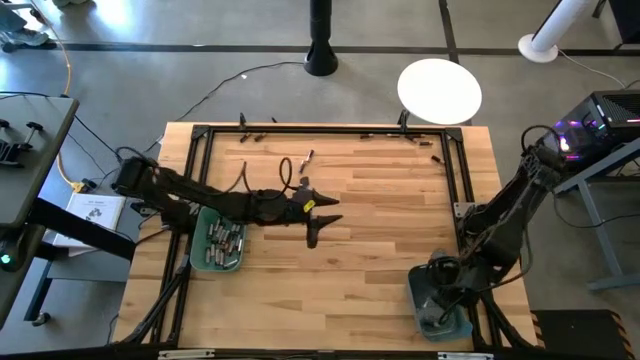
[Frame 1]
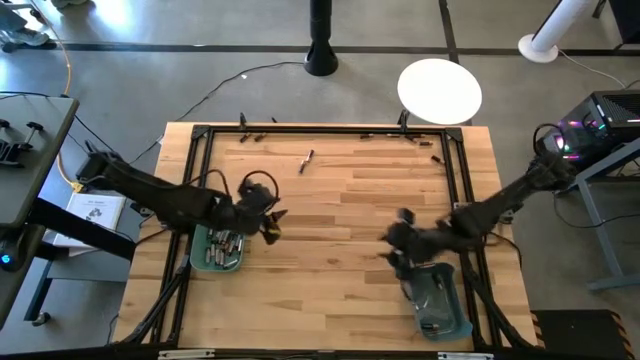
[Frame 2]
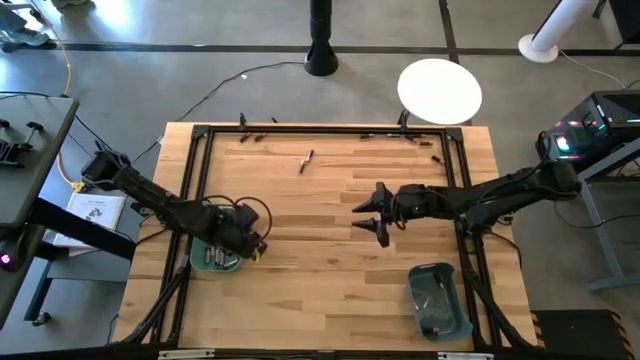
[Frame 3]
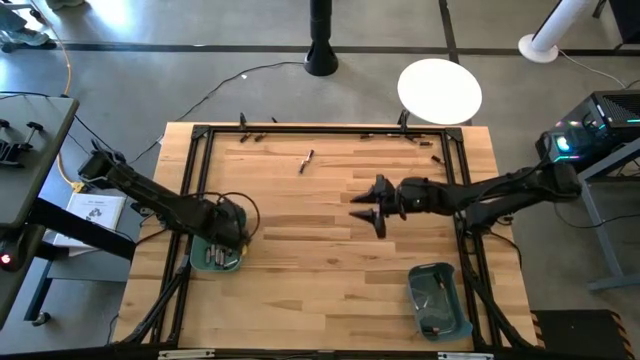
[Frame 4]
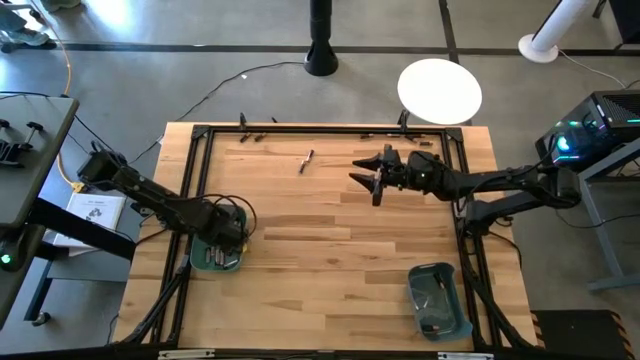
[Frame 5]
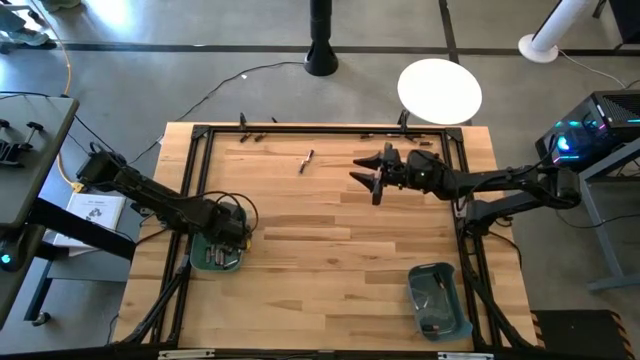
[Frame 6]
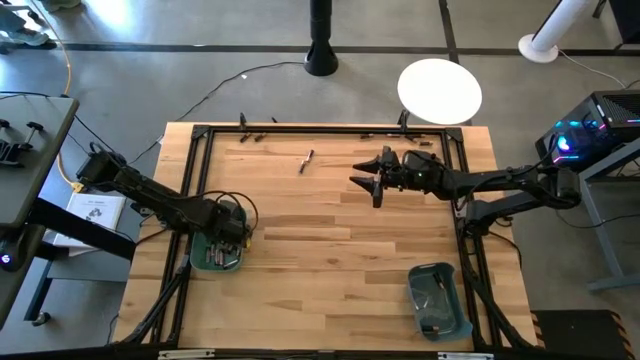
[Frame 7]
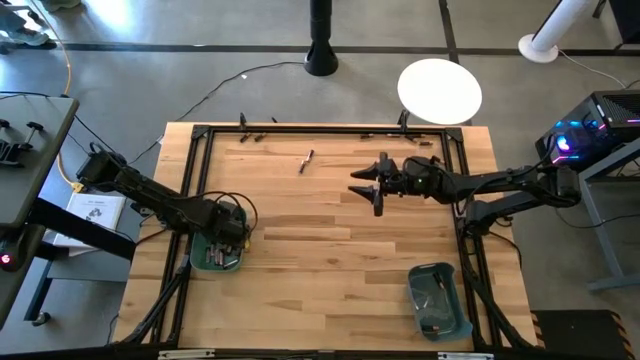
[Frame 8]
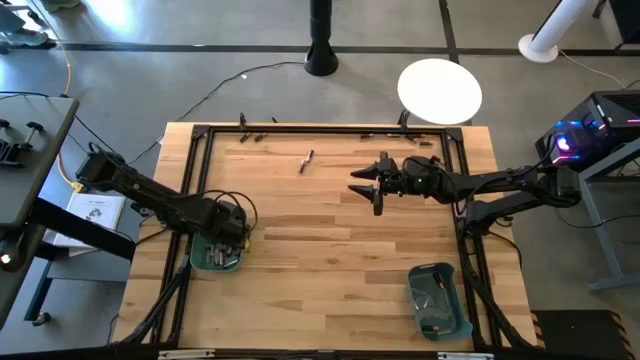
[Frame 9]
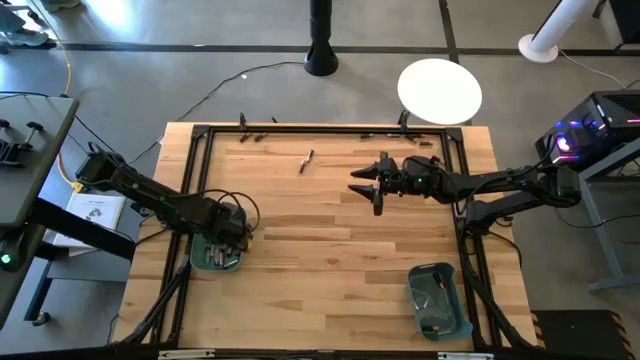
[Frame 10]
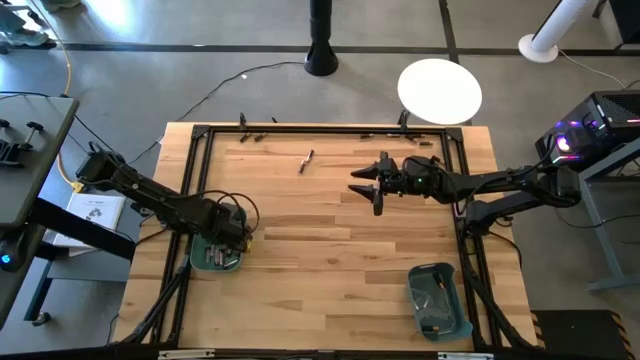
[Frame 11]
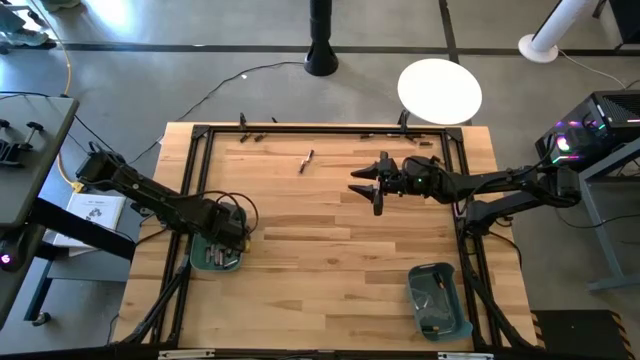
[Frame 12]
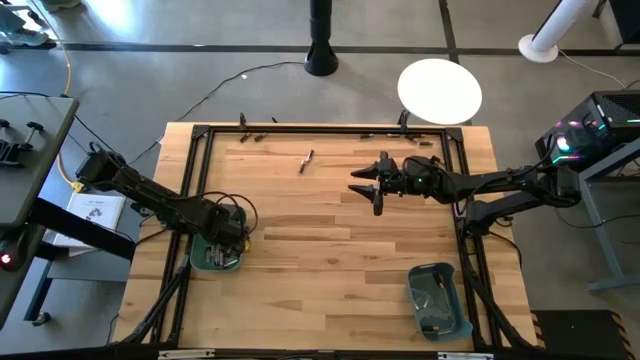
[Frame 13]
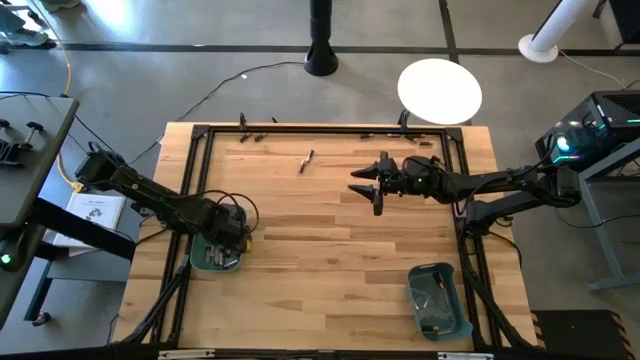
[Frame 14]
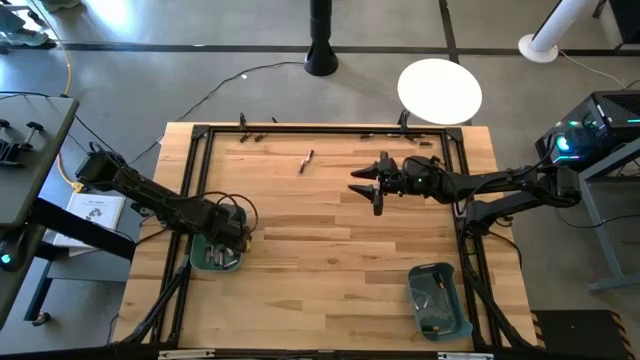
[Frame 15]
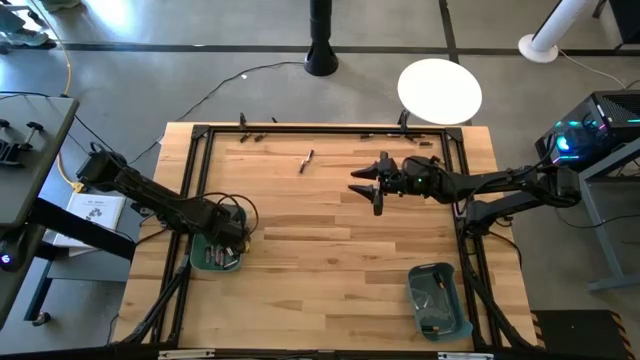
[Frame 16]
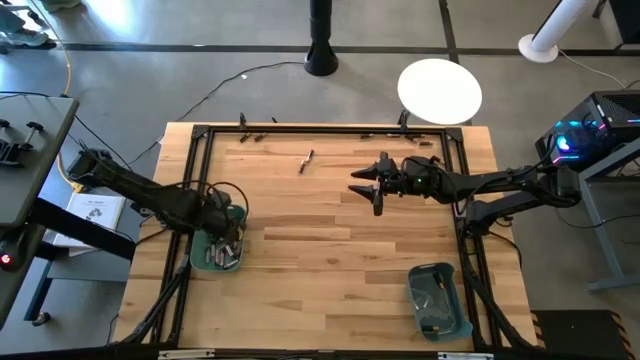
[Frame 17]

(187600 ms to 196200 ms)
Task: Sort batteries
Put the black battery into the blue bin

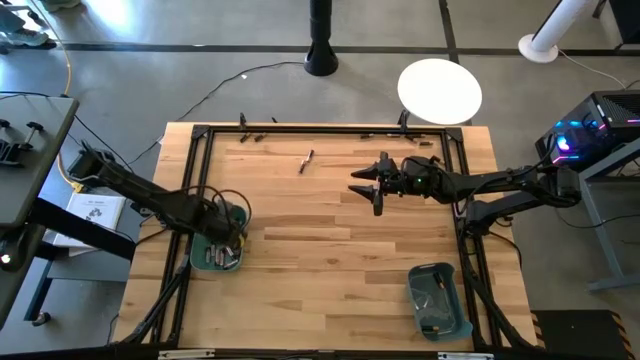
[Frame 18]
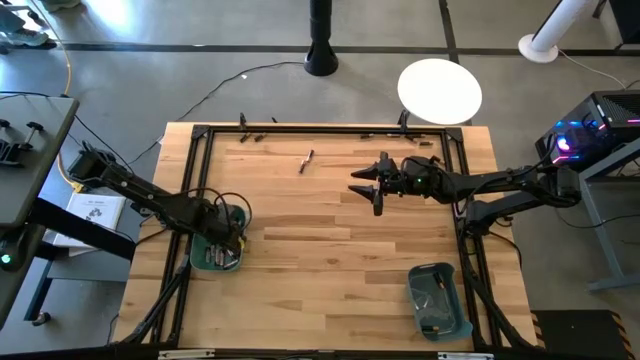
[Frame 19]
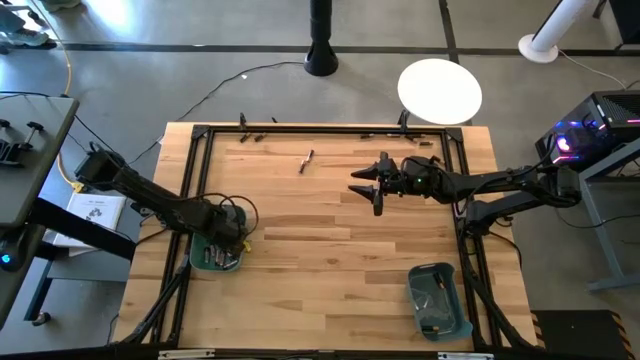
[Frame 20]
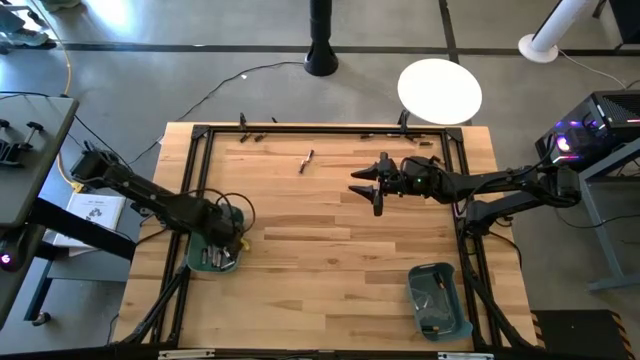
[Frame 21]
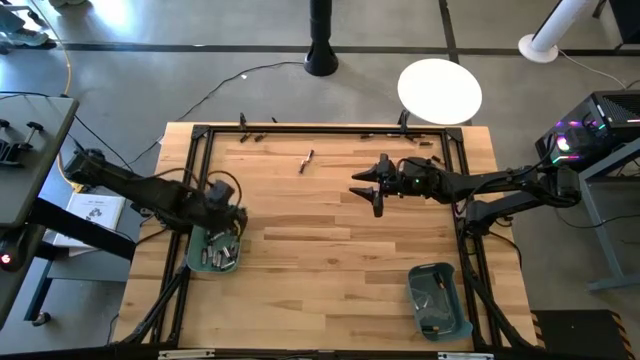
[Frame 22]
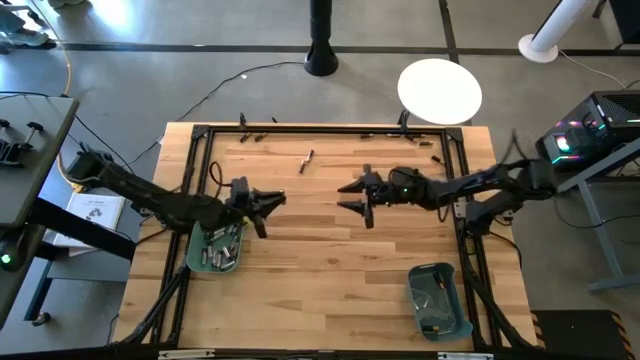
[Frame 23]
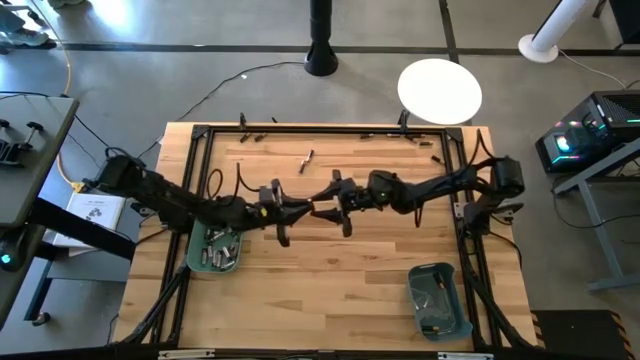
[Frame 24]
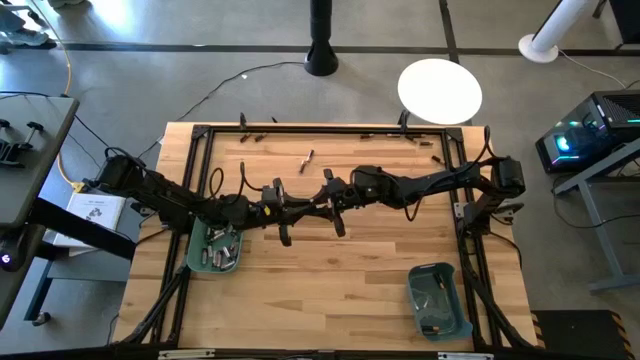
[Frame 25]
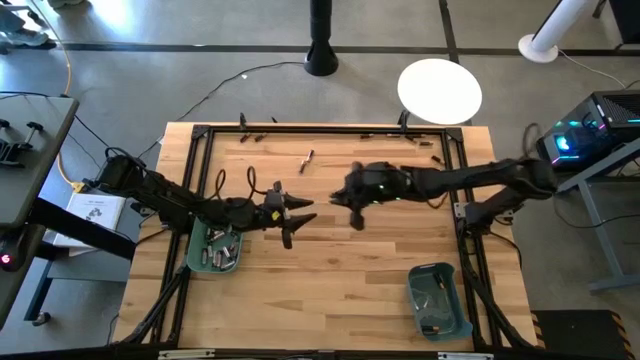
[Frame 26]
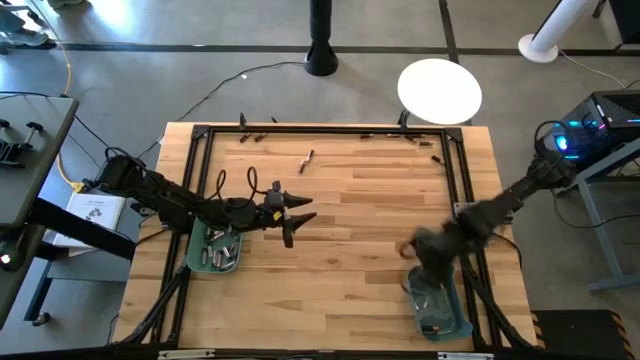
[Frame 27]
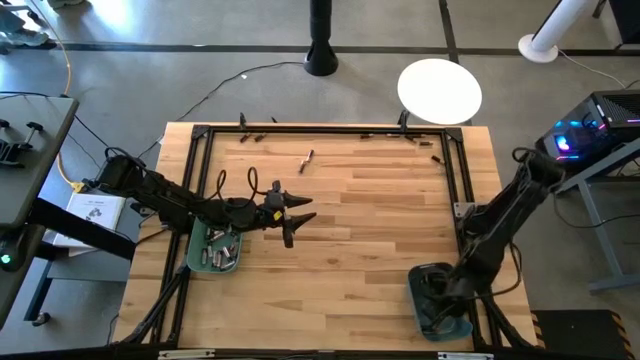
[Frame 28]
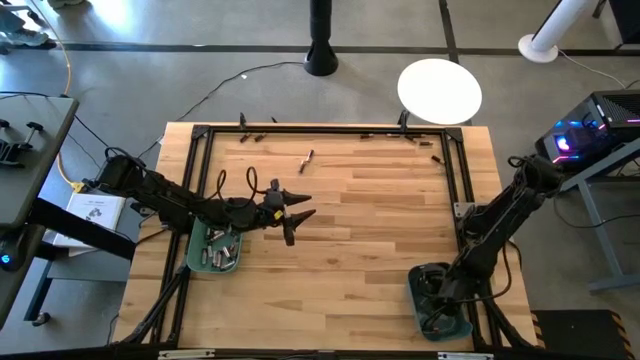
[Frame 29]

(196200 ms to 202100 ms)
Put the black battery into the blue bin

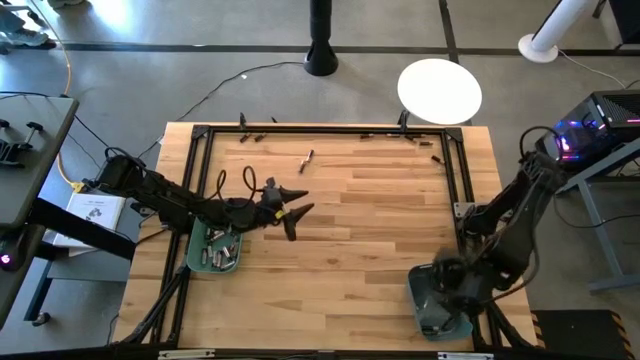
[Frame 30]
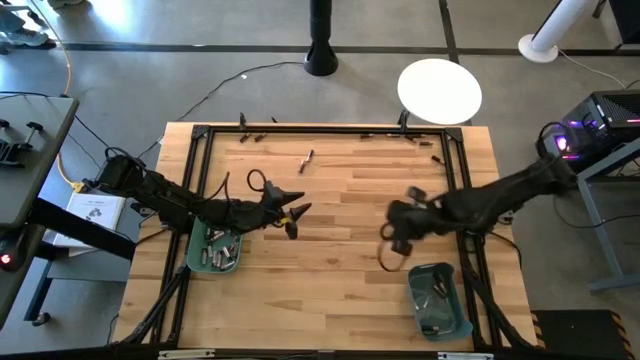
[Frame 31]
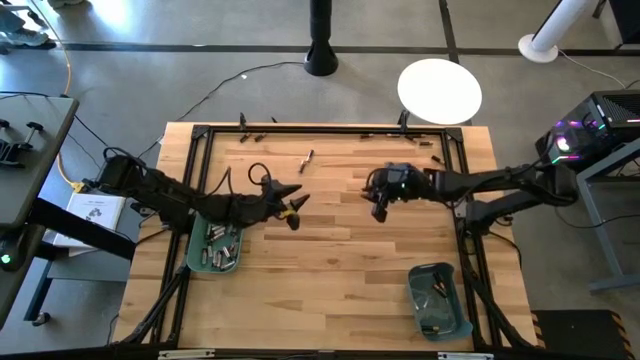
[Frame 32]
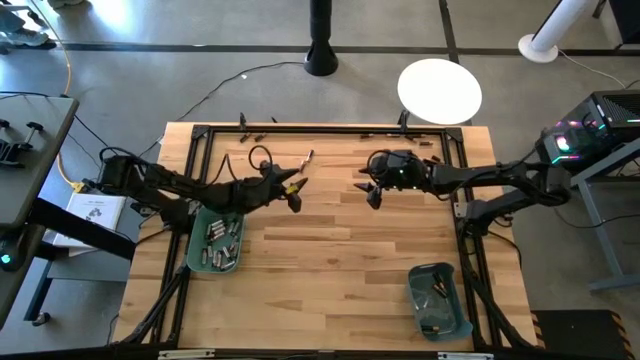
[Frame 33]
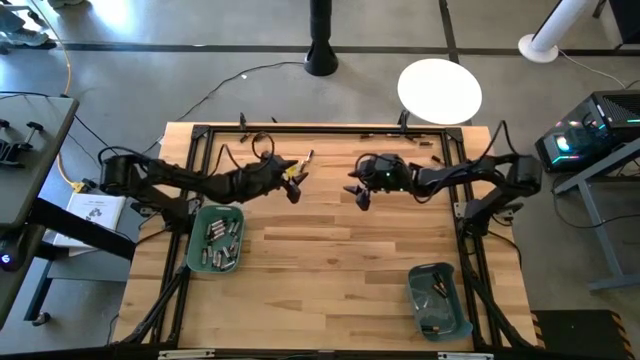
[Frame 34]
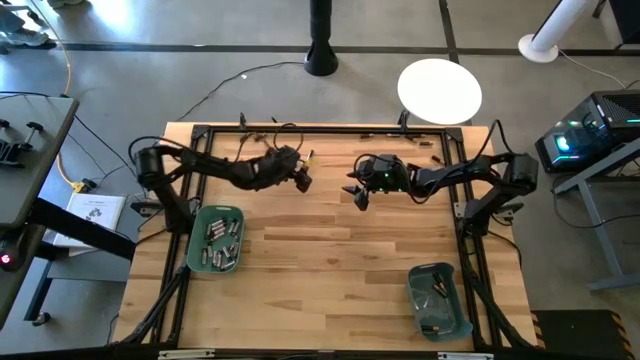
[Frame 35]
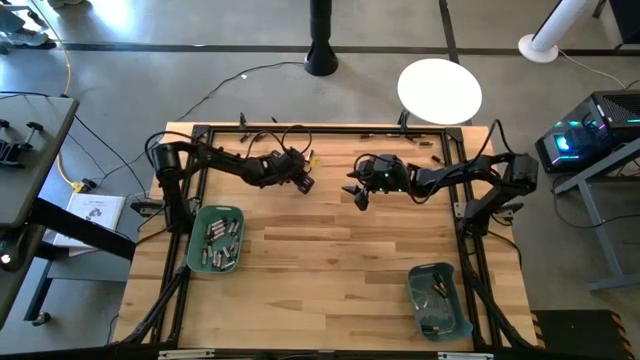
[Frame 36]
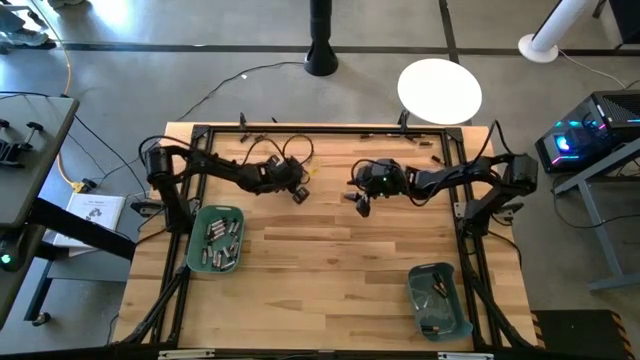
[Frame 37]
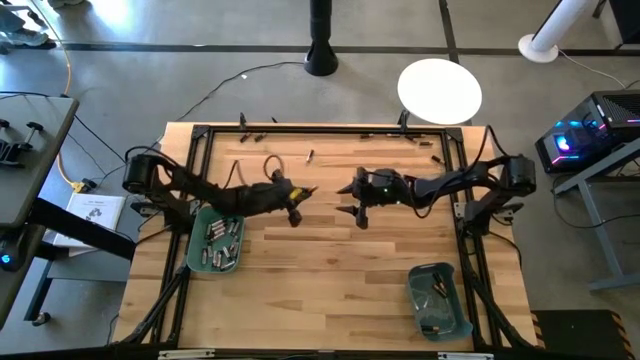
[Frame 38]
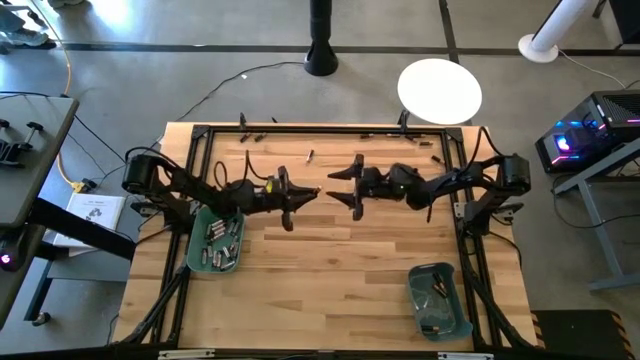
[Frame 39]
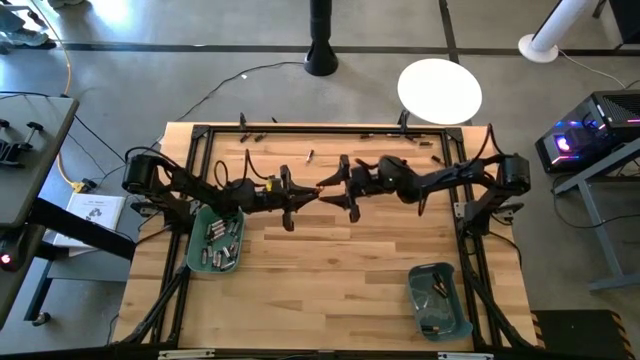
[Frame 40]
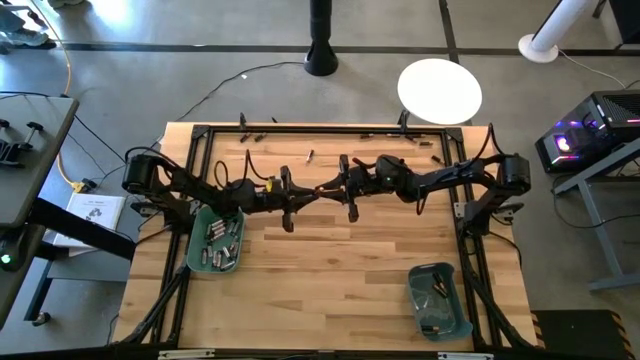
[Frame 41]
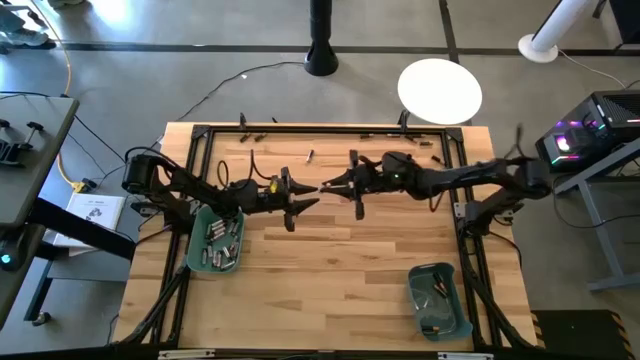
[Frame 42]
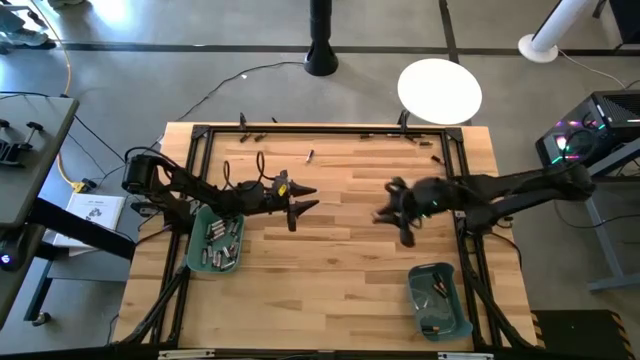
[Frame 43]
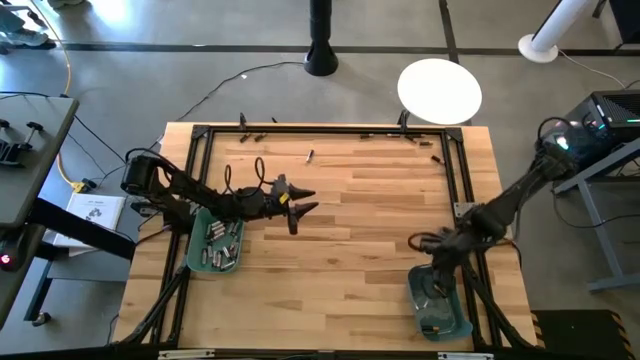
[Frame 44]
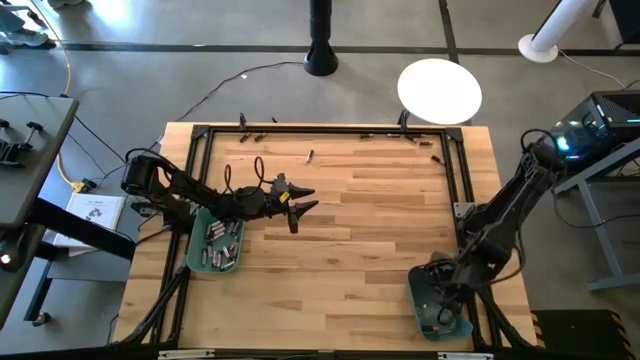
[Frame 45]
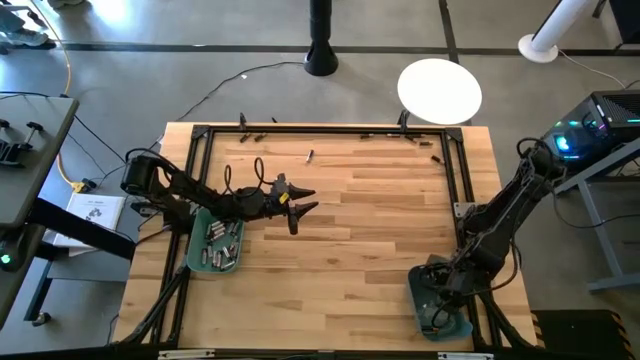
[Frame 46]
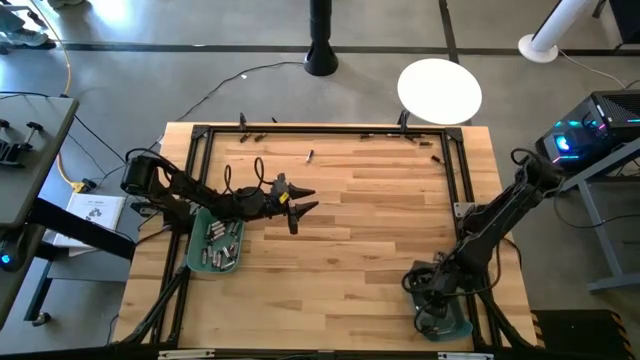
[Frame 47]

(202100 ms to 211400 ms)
Put the black battery into the blue bin
